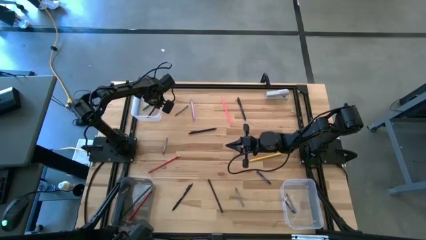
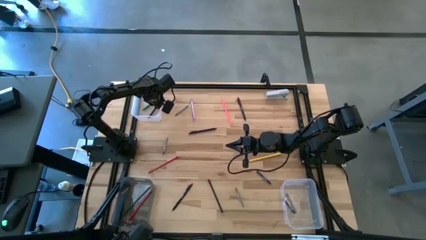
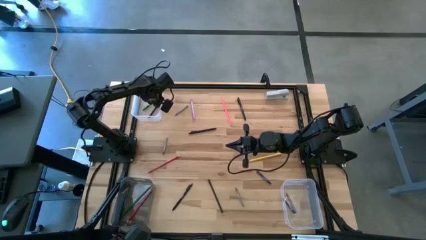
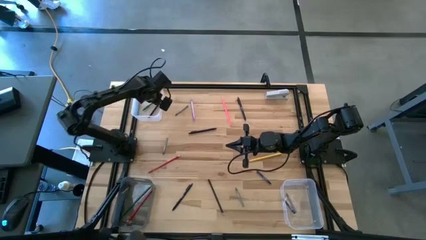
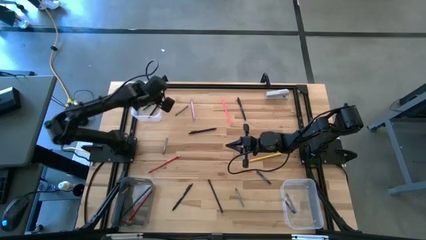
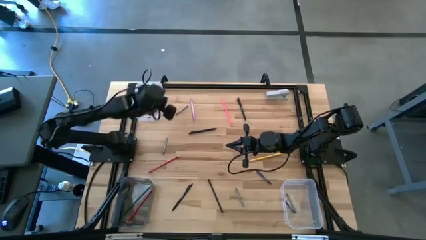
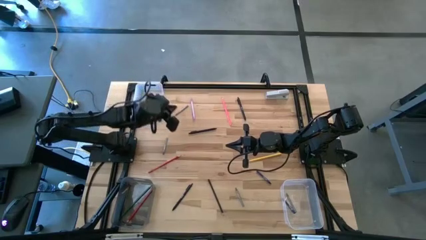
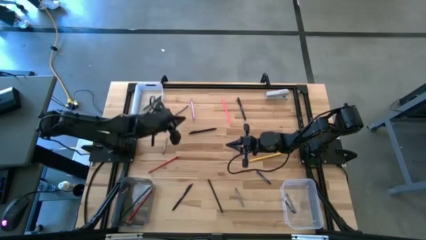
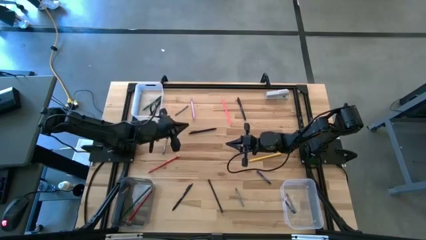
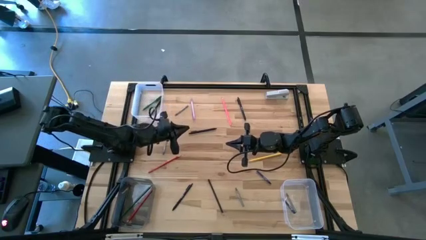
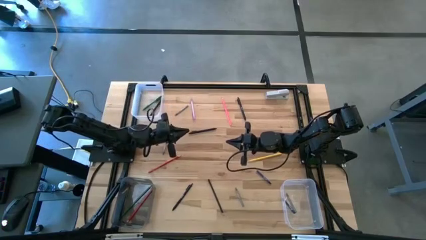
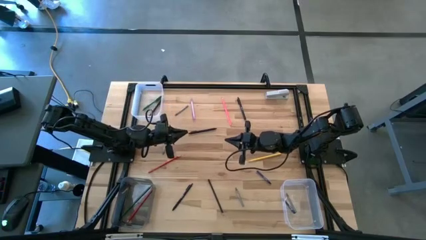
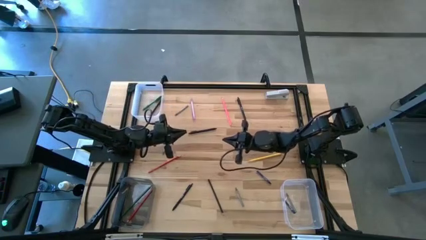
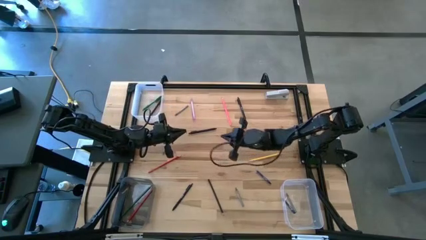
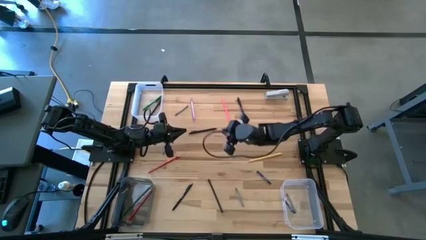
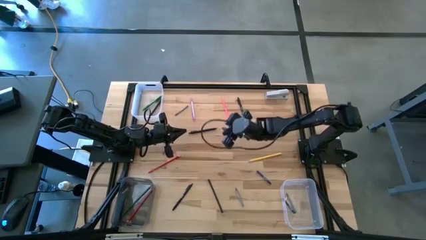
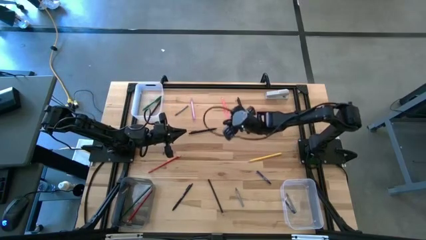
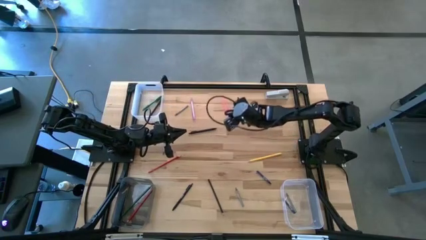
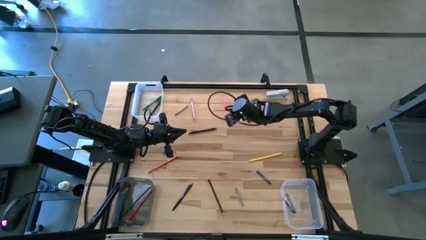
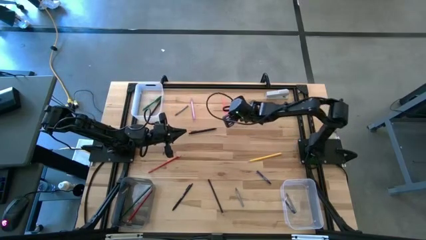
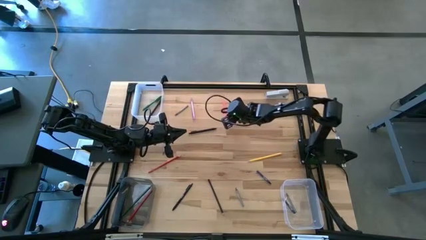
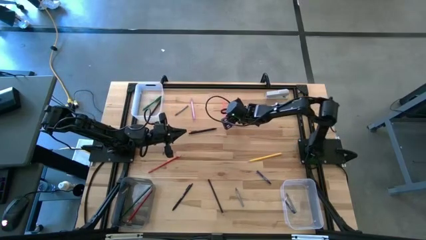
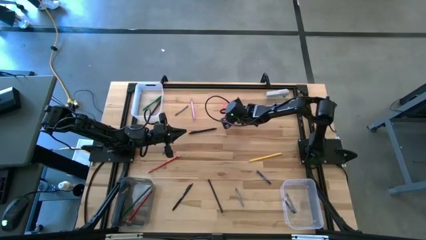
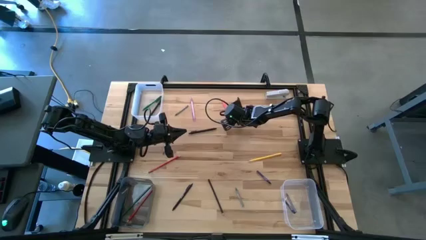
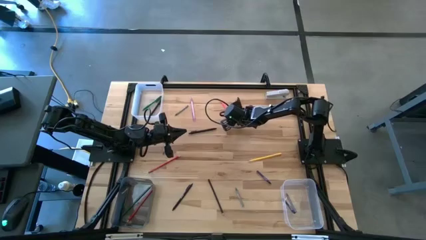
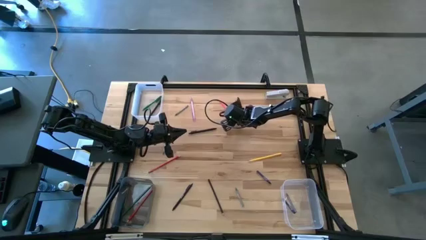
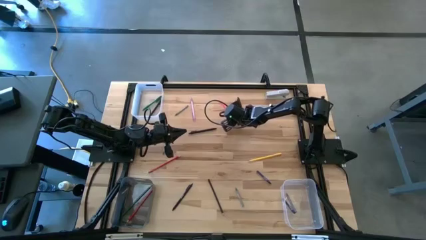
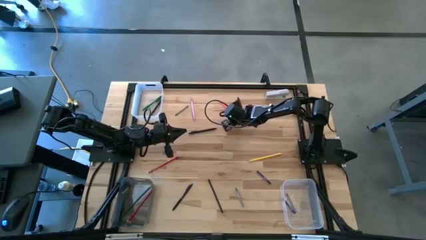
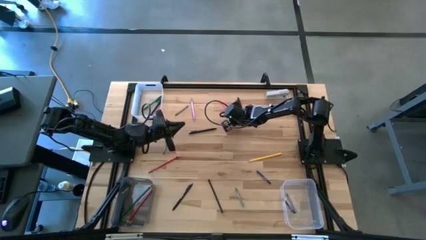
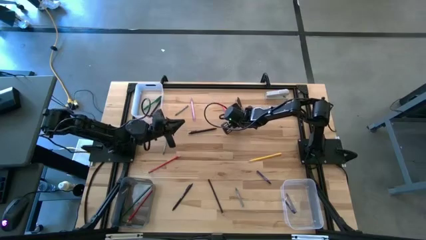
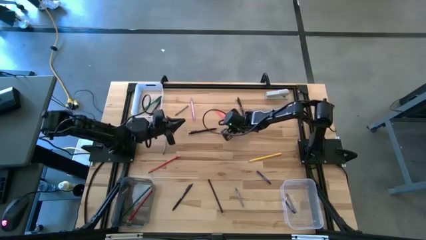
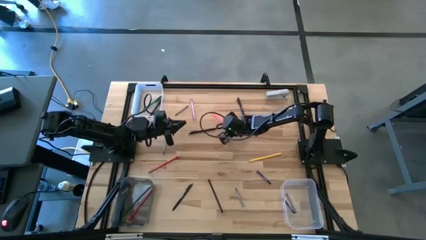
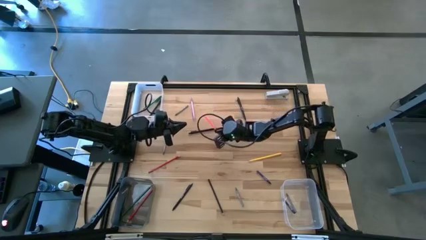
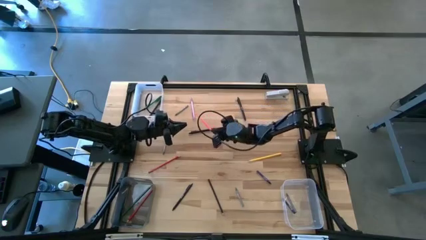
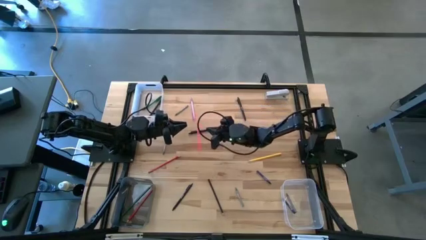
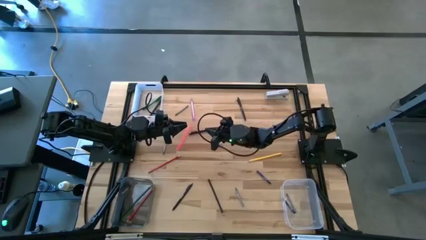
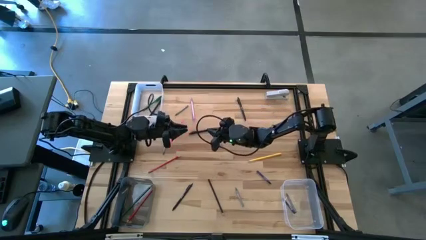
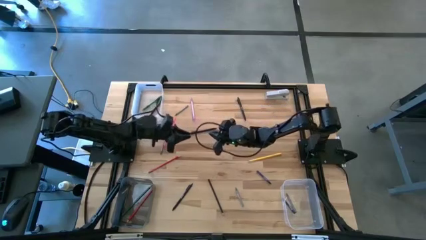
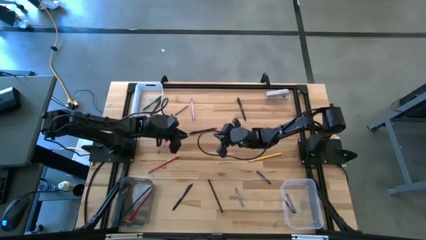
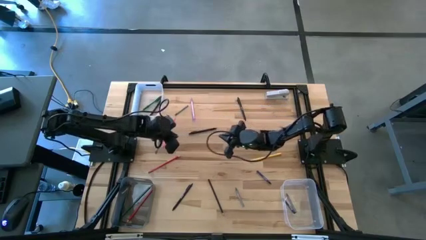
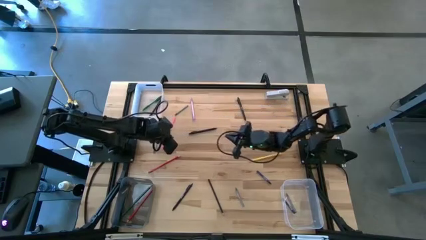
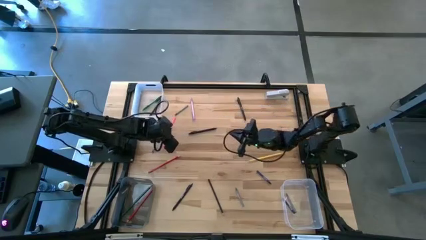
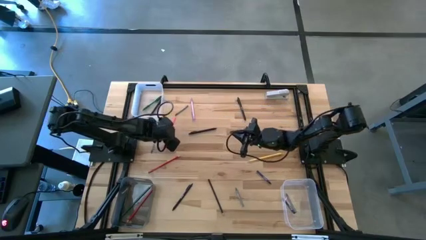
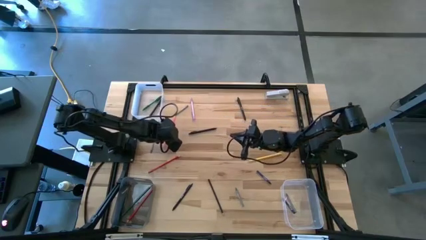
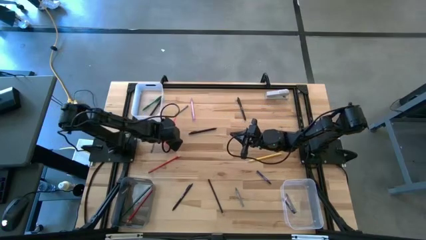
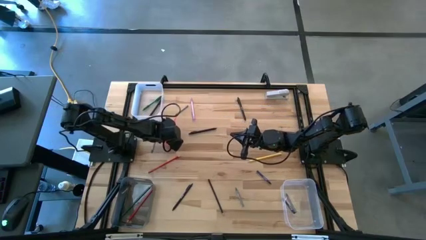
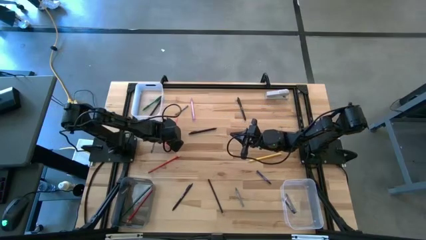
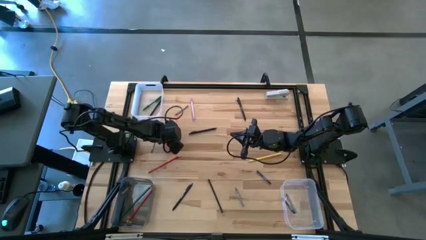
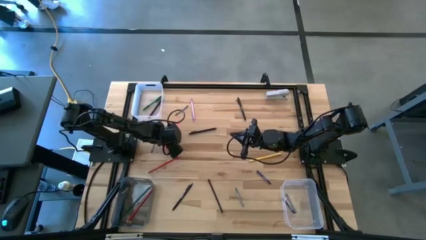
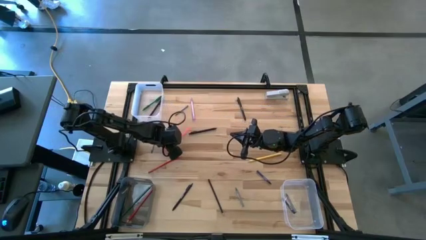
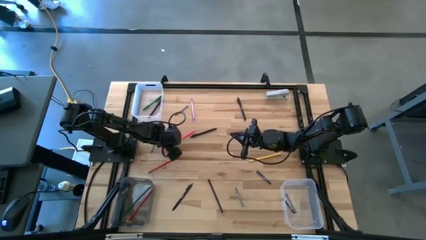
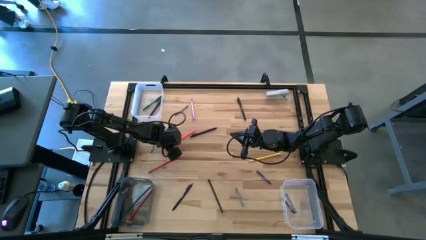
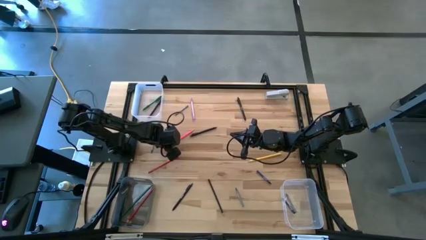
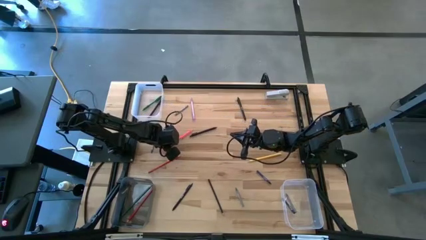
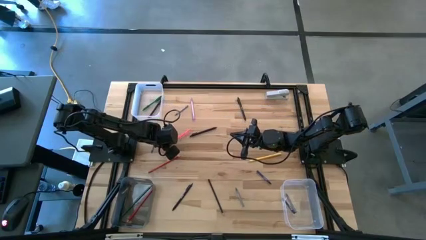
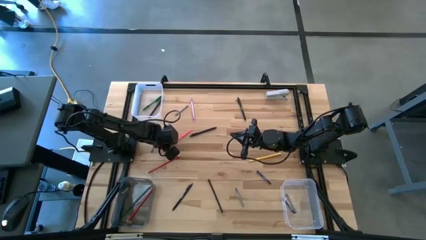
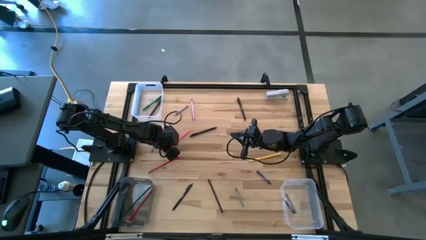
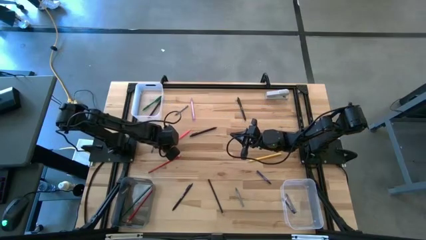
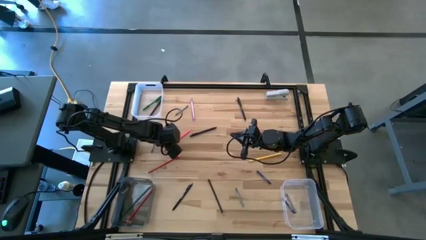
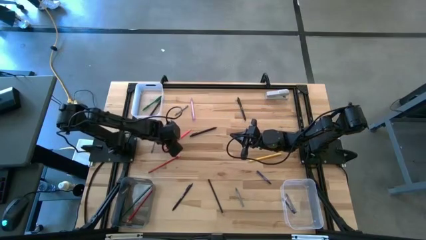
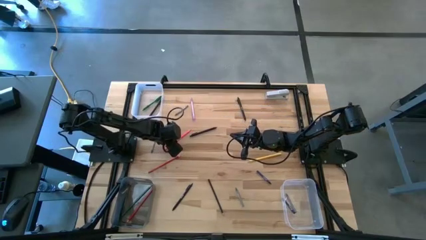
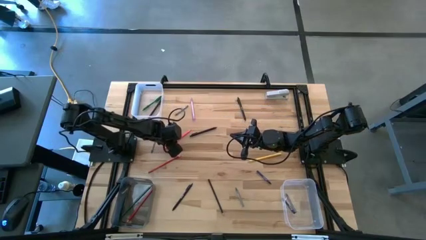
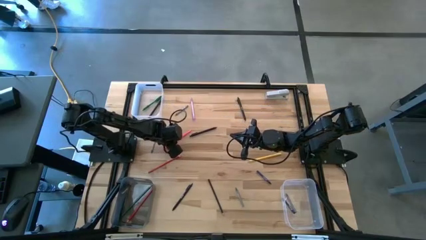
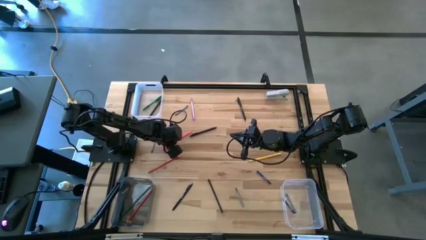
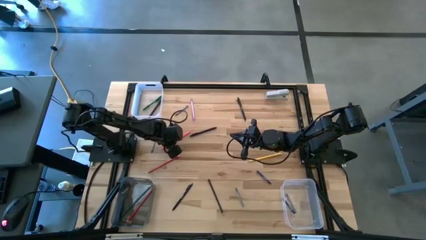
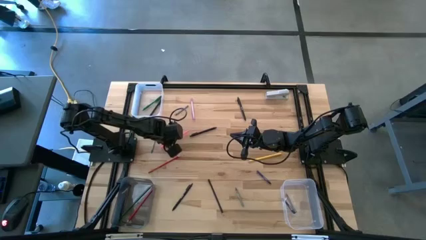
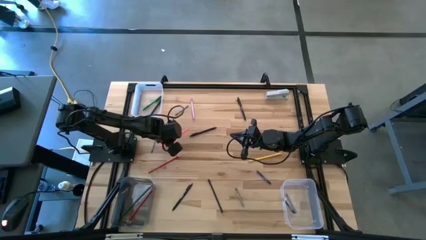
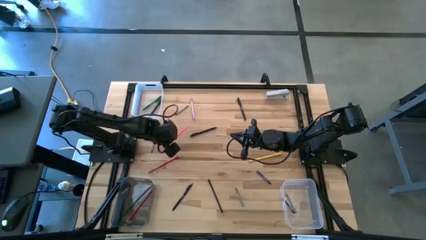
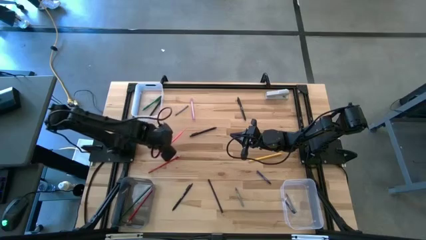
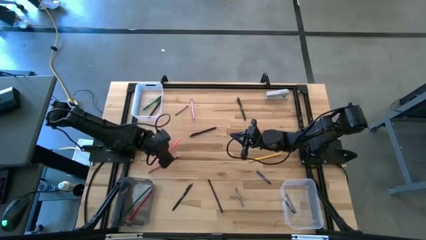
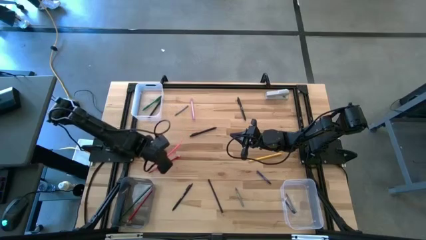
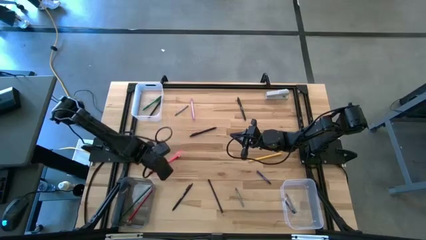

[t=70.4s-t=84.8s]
Task: Sort crayons/erasers/pens/pencils in bins
Put the pink pencil into the black bin
